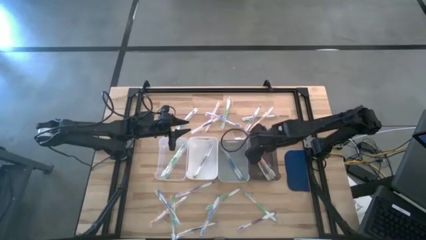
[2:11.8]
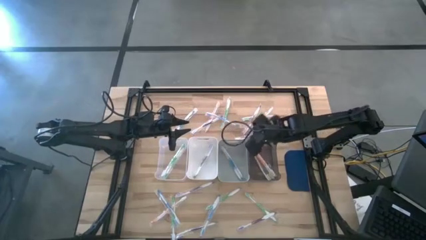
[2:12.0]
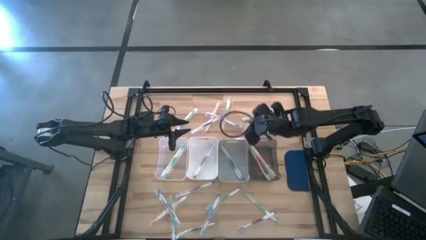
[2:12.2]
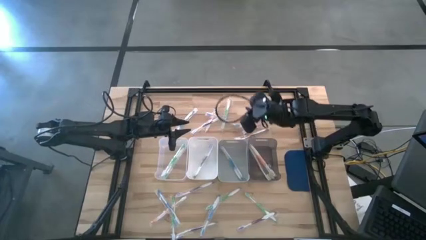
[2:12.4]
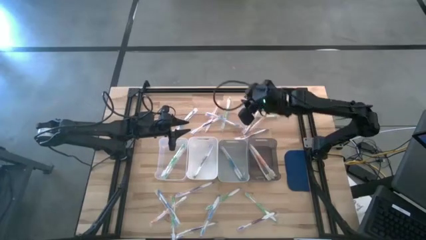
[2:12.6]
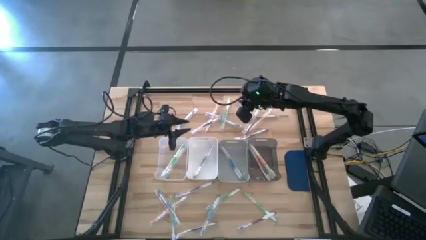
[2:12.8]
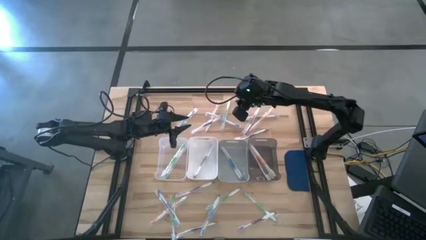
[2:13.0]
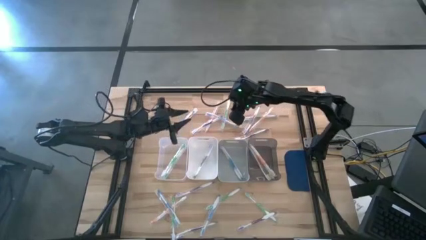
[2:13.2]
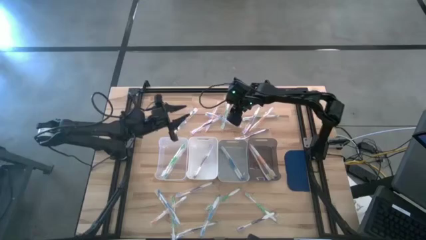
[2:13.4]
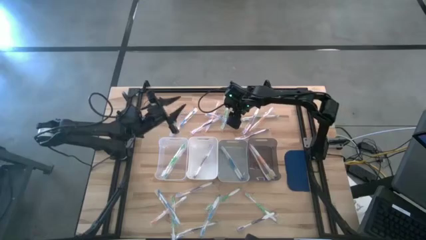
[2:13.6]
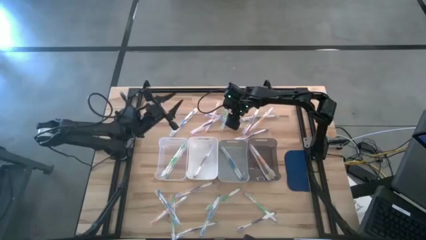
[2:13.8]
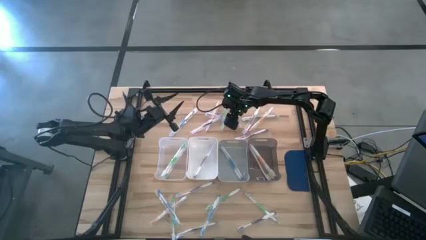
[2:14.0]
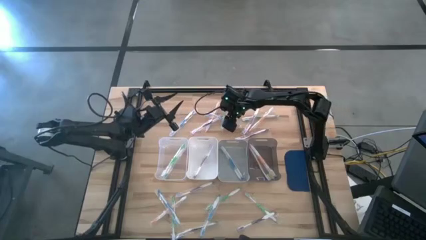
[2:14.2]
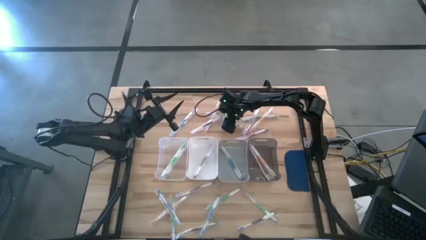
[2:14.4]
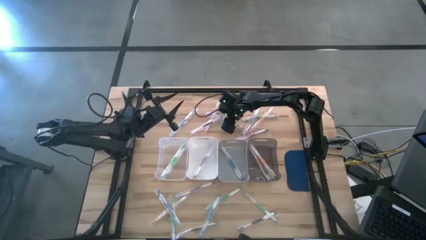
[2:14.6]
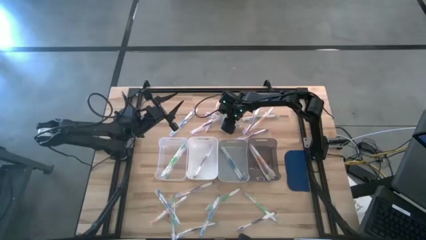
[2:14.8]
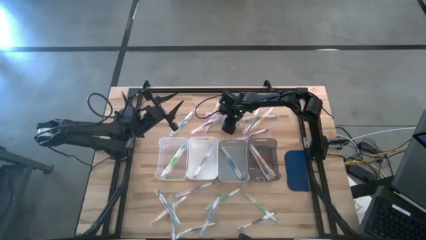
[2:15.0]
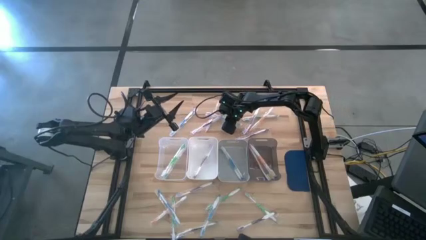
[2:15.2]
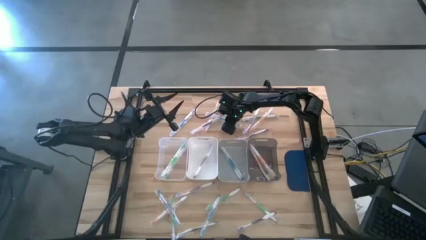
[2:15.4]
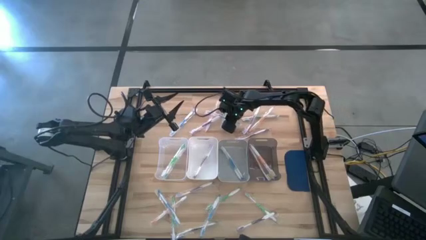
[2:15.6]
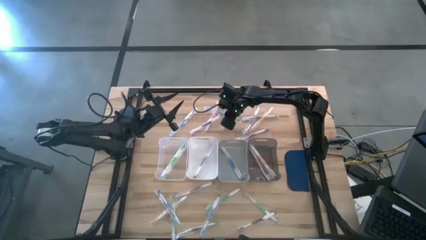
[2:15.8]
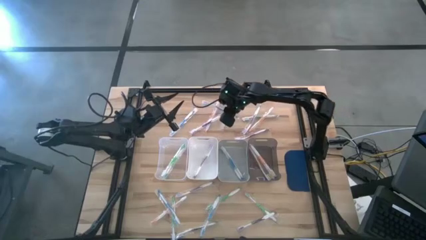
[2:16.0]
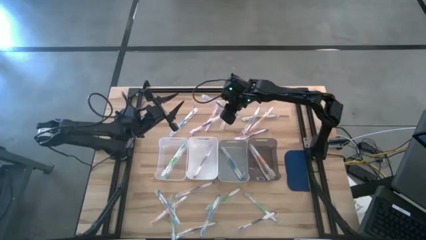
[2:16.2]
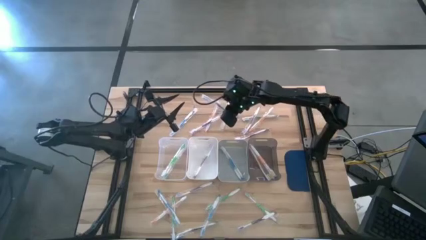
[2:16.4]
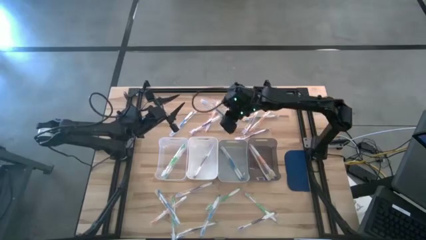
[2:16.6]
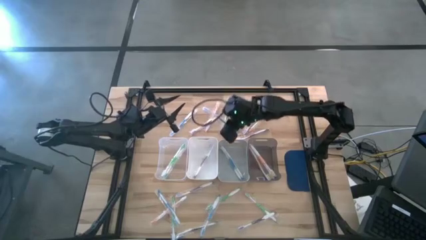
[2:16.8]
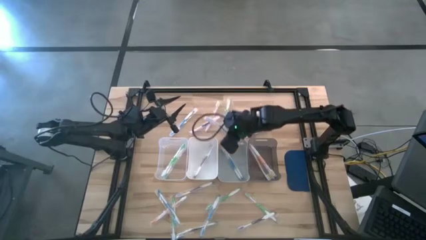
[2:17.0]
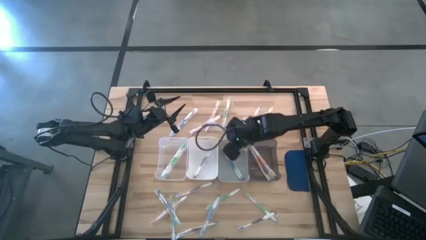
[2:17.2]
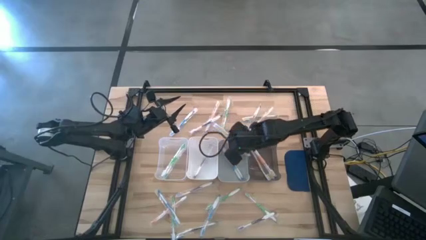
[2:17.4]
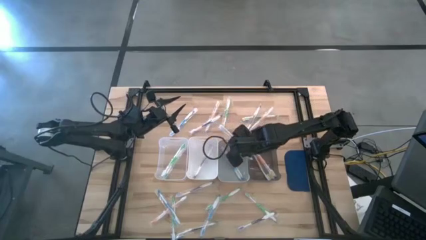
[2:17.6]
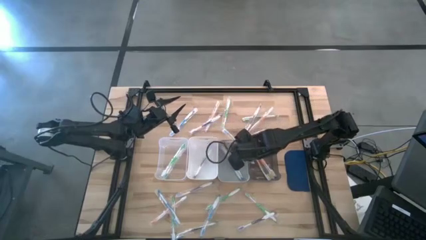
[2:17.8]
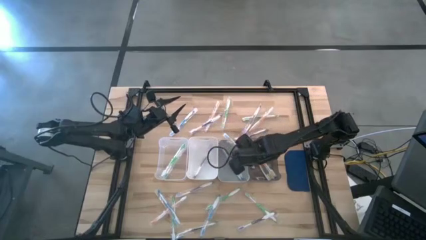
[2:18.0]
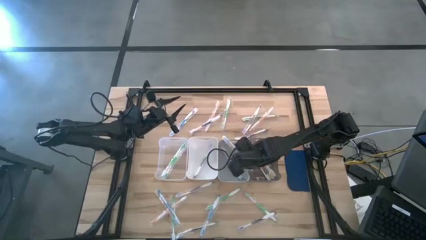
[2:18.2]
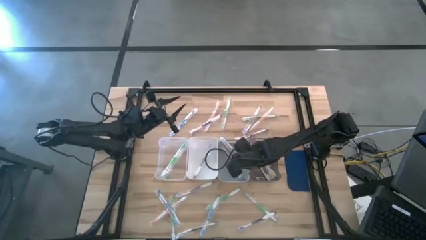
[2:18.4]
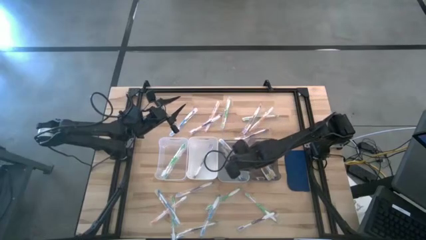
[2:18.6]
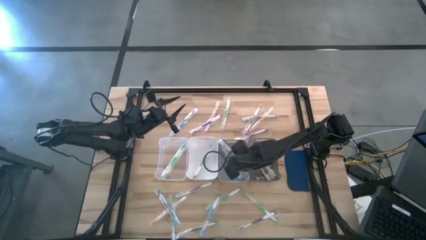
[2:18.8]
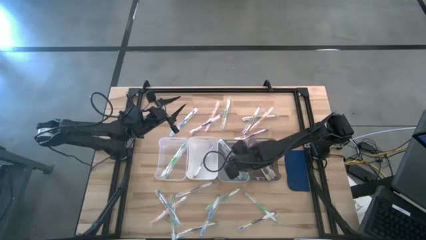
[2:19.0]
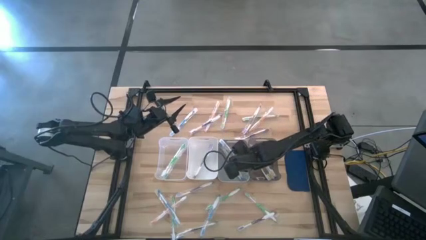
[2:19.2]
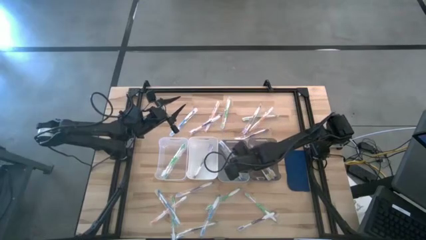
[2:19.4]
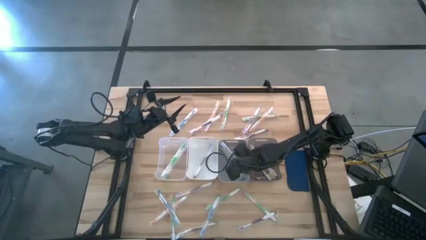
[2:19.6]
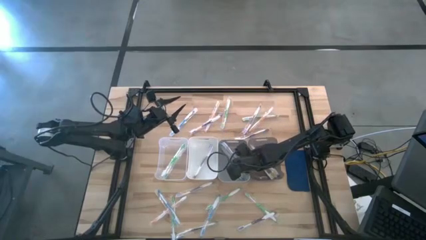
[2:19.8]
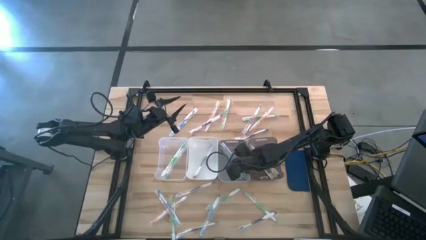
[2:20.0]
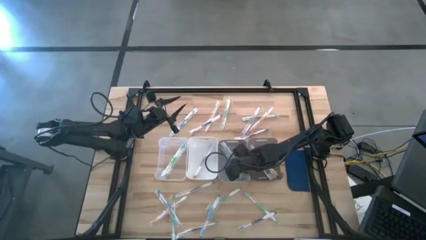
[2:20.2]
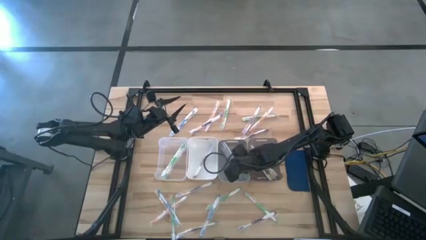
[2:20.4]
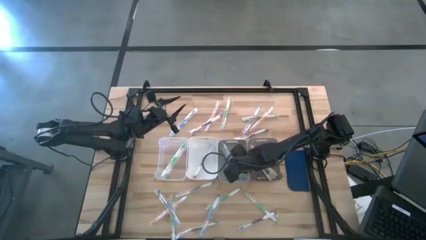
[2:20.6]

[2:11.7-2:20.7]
Task: Pick & Place Toothbrushes
Put the blue toothbrush into the gray bin

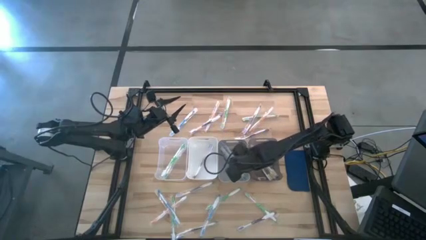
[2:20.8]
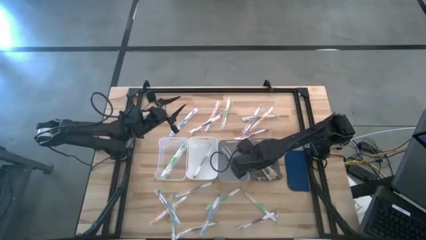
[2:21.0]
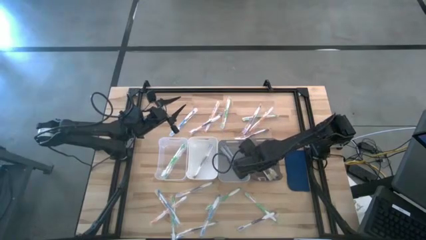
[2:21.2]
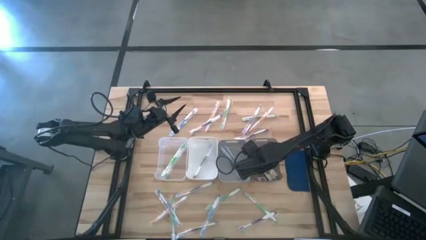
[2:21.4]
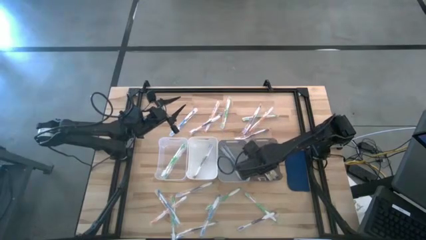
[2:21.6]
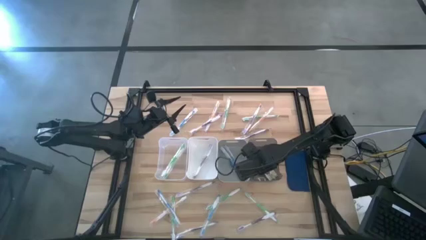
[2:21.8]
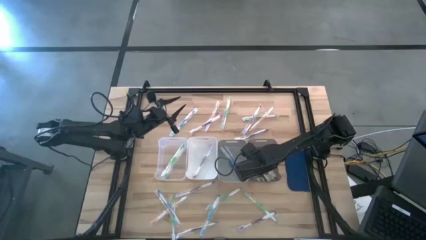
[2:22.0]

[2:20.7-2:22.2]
Adjust the black bin
